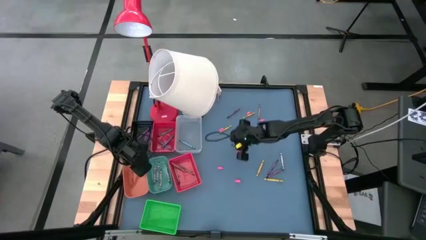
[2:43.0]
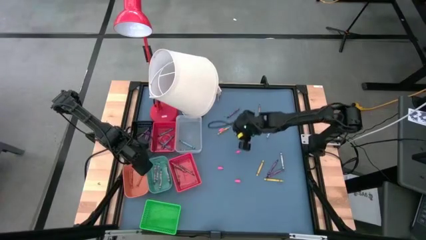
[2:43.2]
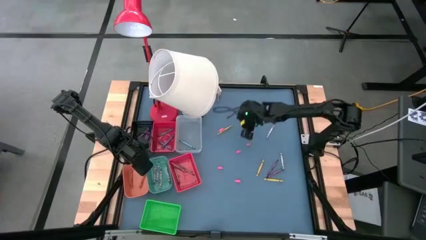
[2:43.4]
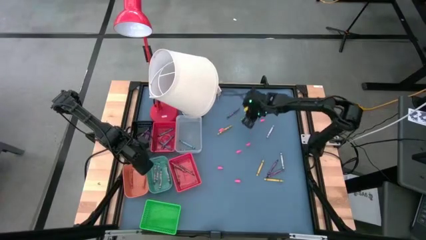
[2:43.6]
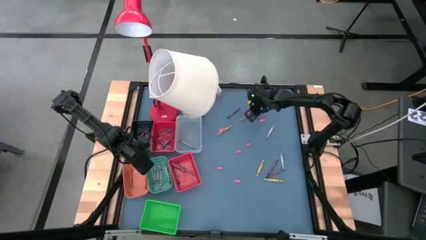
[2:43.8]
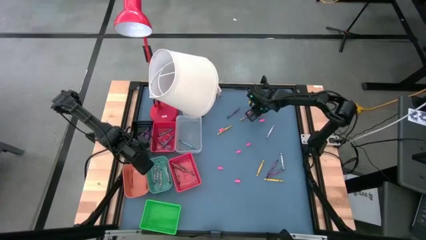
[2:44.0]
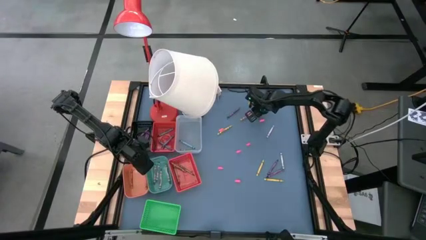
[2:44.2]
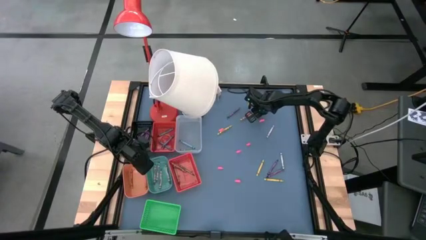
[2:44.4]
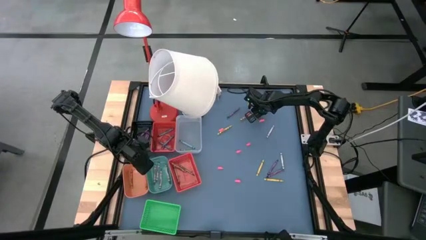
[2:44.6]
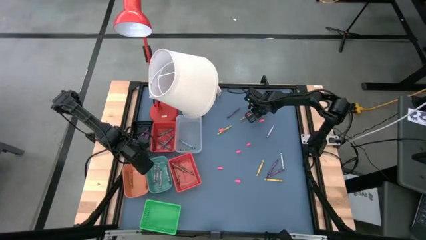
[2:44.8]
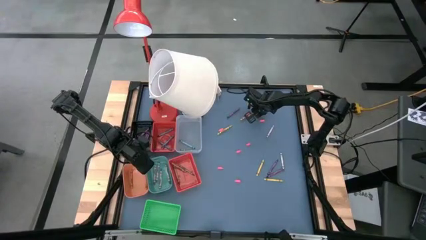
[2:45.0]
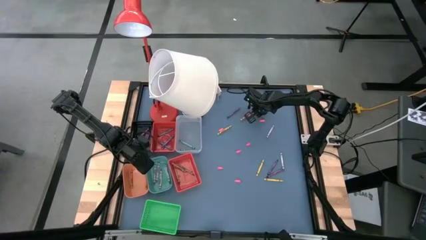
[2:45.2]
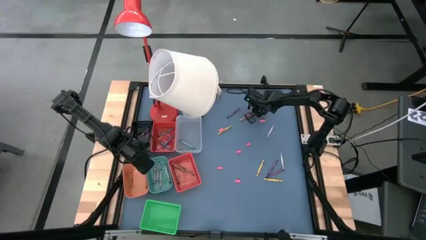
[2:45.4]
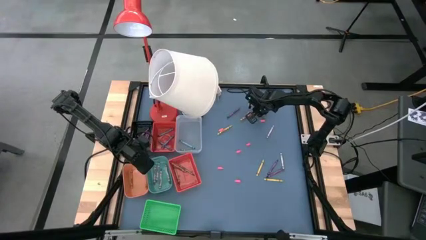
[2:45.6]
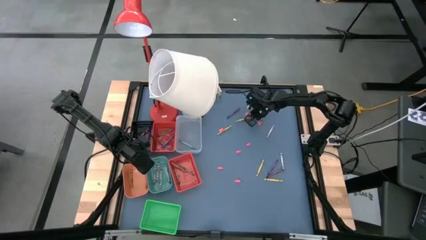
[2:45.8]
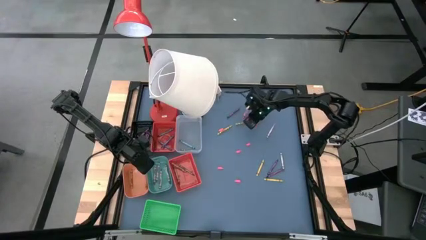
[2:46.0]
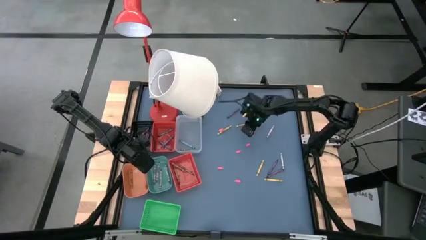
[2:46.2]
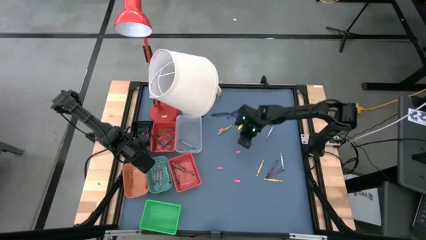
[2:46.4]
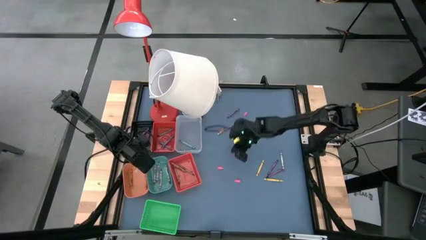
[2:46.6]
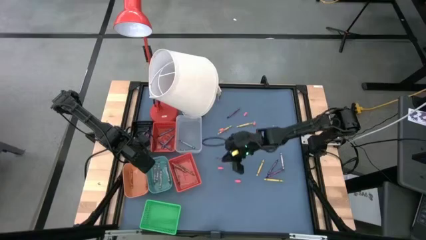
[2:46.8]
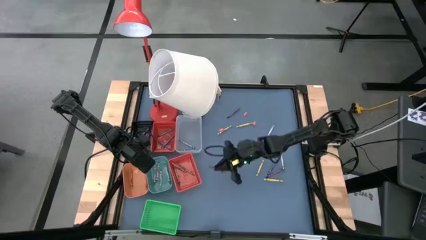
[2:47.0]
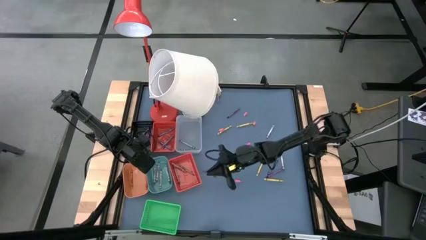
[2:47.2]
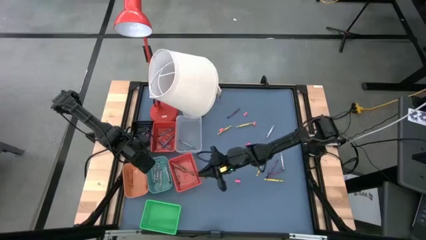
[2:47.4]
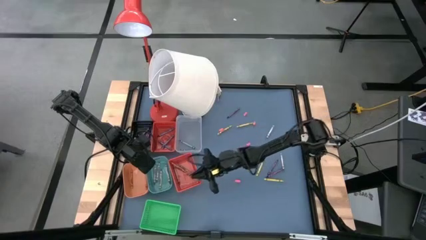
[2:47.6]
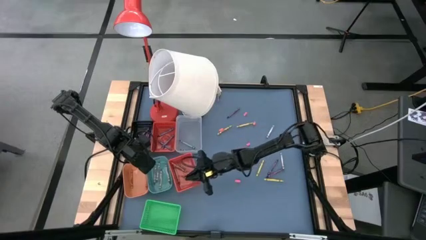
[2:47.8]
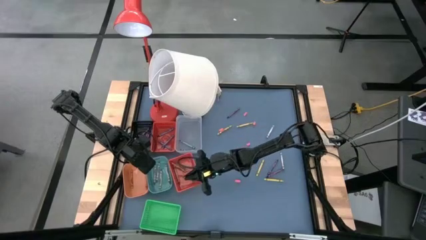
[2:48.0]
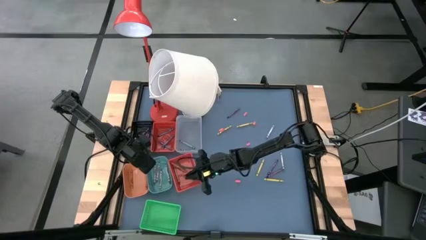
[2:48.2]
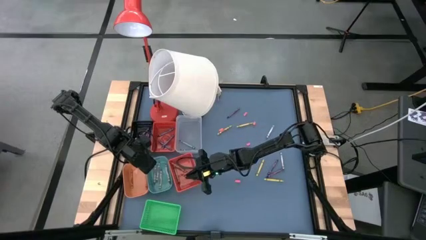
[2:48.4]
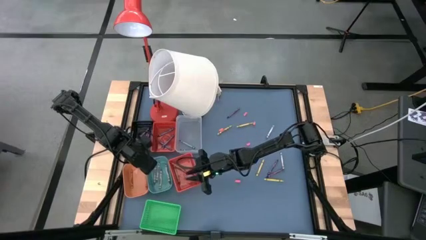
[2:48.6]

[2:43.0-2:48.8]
Task: Sort crayons
Put the brown crayon into the bottom red bin

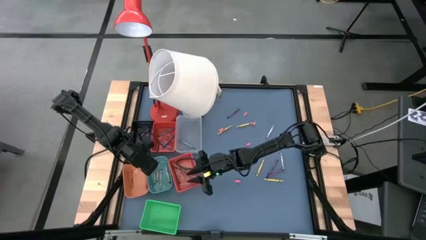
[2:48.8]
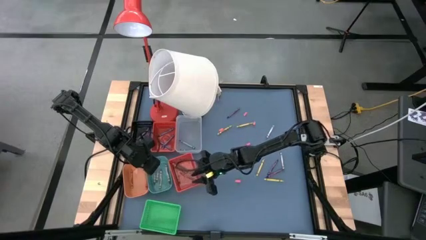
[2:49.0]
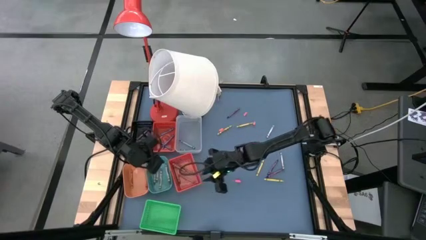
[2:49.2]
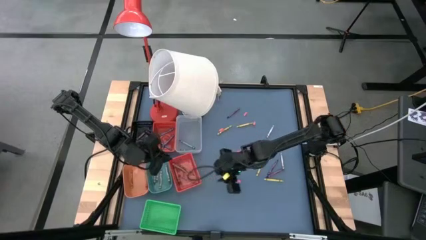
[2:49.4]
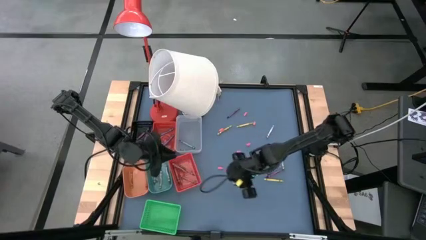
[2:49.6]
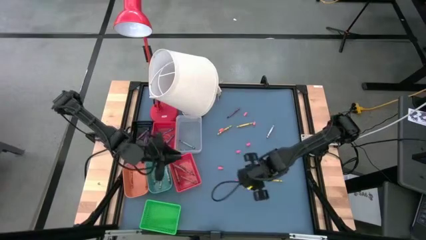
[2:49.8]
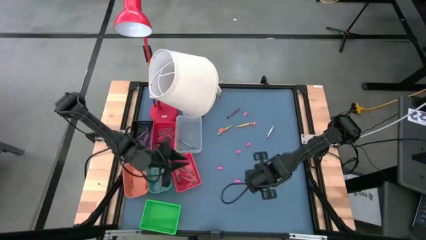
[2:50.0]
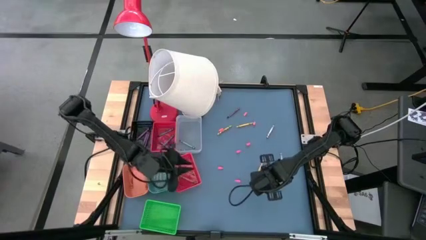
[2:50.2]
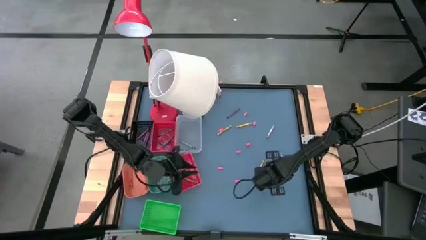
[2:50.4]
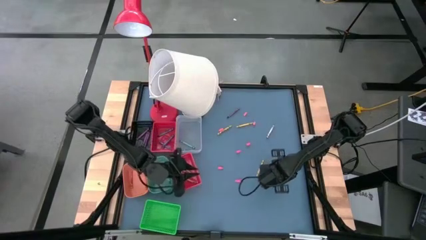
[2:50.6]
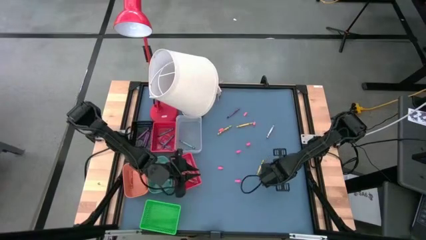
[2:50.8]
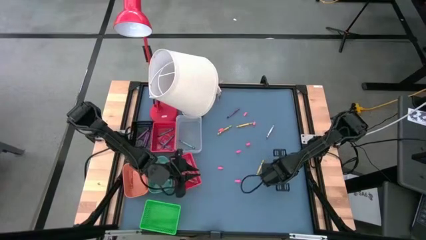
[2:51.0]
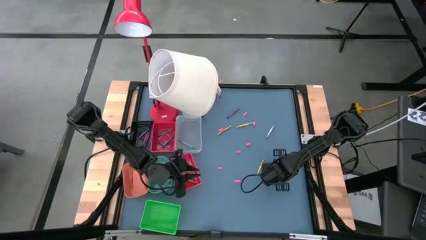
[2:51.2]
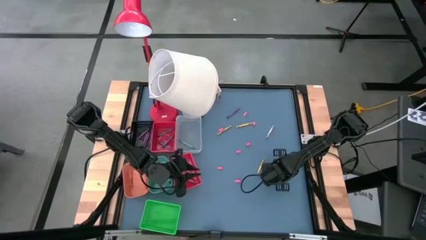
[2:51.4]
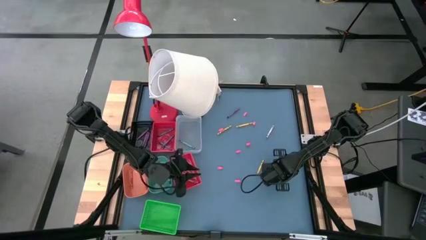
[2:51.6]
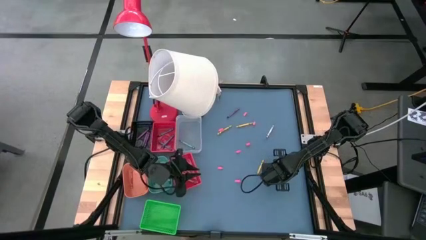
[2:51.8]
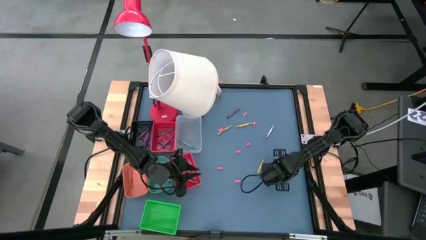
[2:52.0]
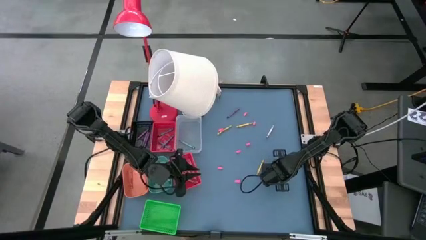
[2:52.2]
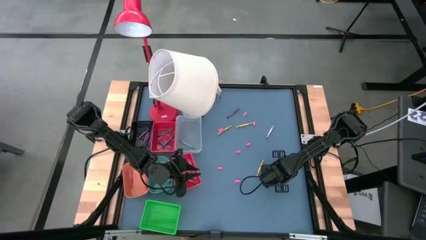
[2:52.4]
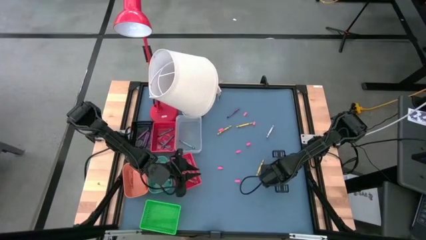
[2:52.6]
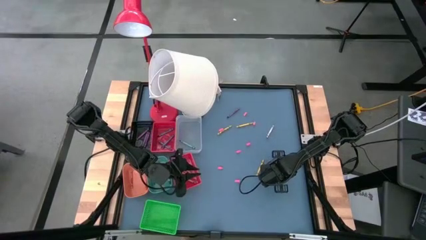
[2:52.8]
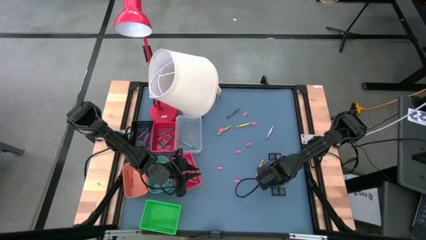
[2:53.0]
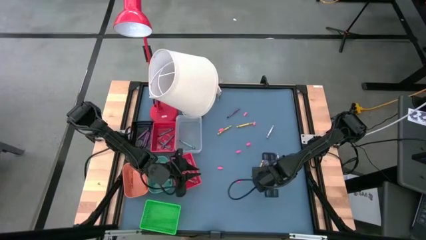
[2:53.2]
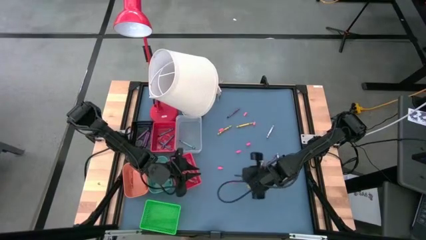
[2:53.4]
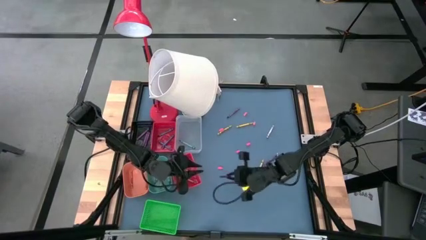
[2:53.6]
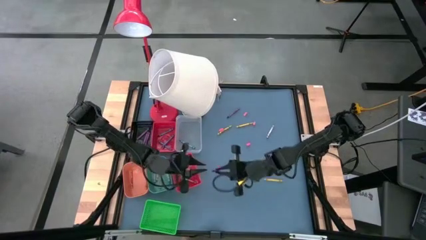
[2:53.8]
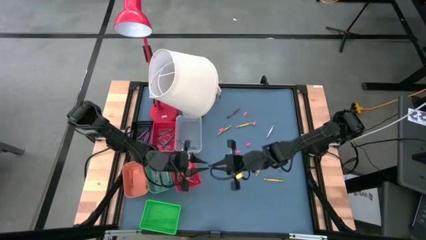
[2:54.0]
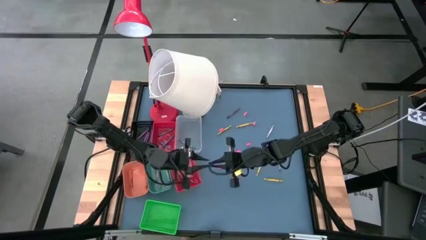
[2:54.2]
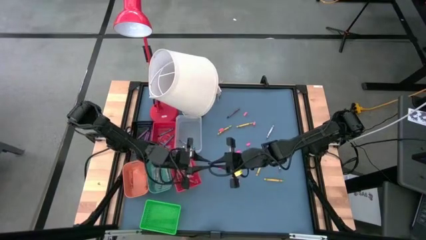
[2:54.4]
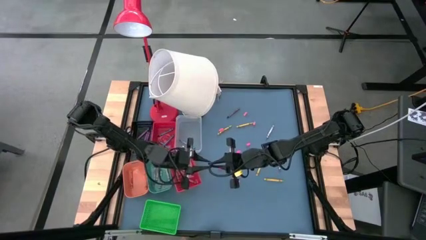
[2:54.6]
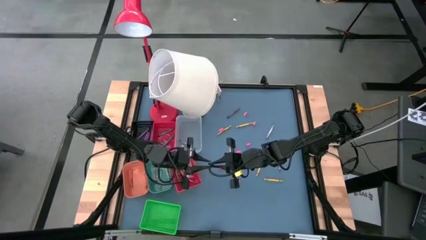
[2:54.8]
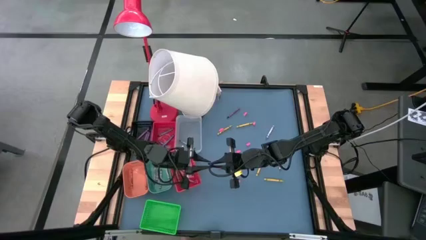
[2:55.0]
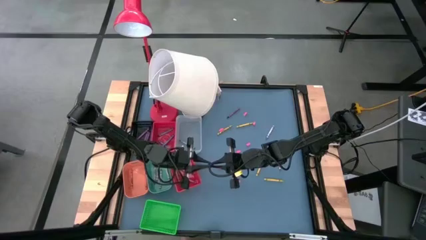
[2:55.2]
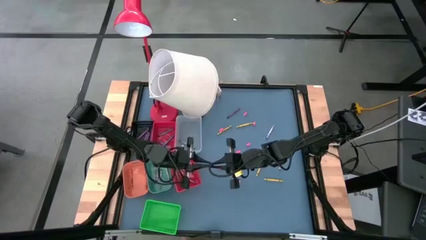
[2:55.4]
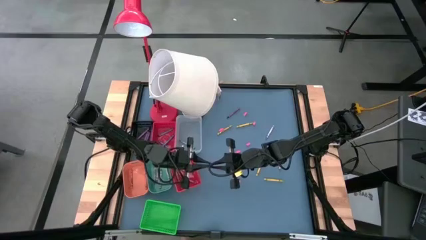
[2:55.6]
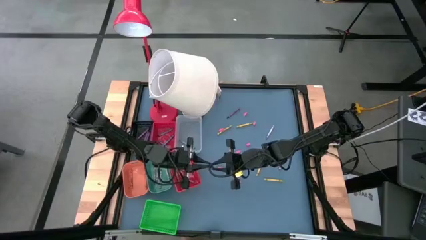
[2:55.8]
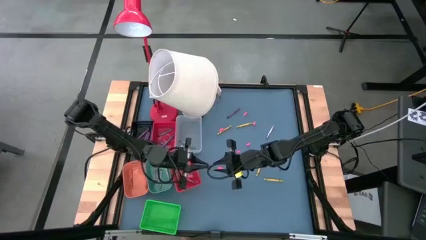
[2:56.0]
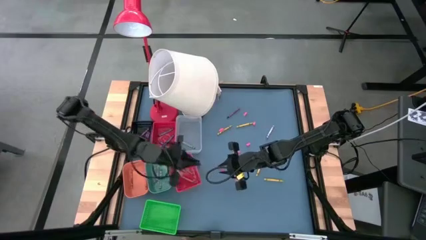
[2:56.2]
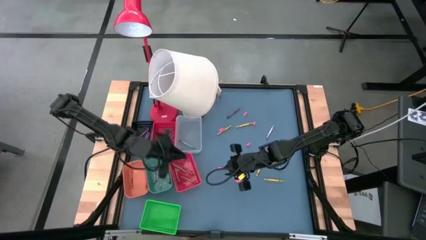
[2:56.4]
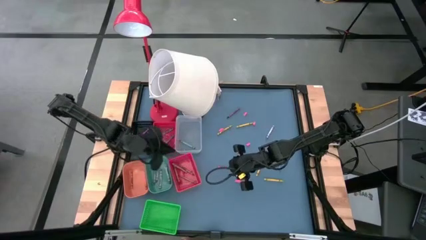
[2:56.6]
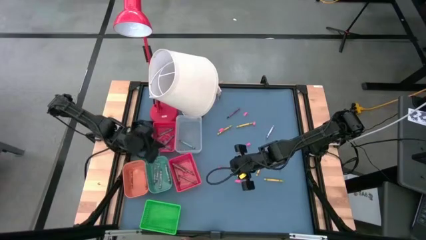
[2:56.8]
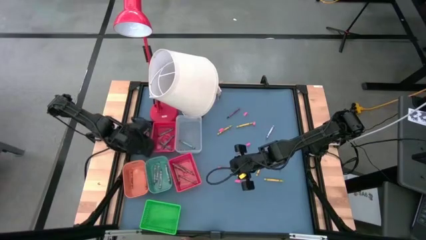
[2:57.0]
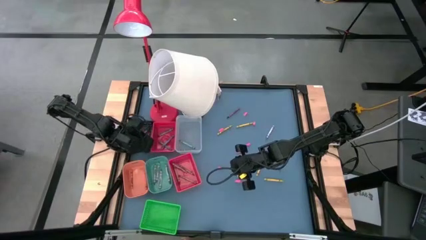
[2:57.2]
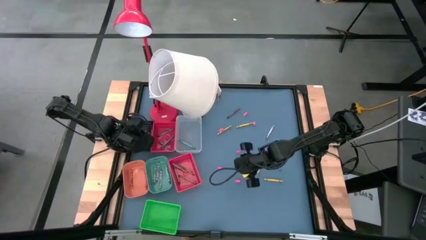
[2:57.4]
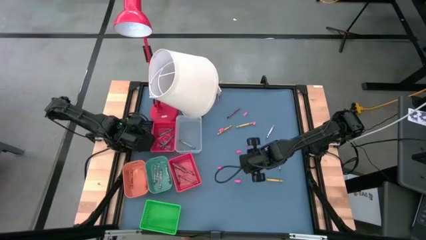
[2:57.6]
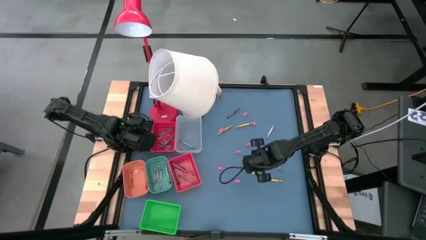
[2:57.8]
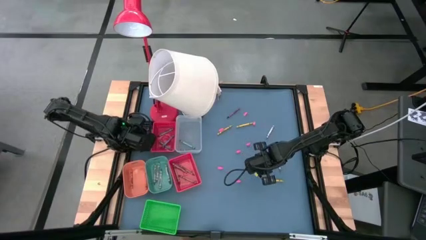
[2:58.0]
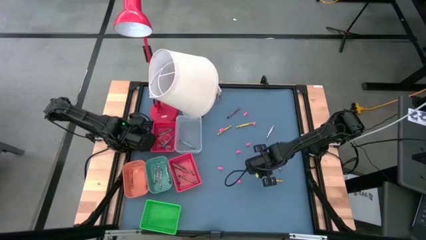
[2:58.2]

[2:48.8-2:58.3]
Put the violet crayon into the black bin
